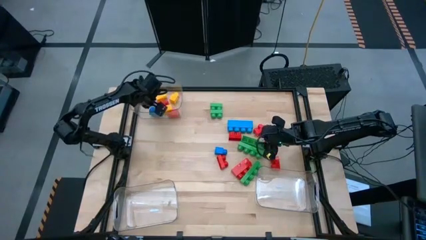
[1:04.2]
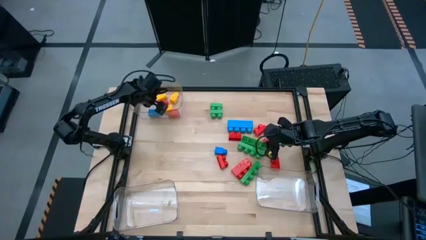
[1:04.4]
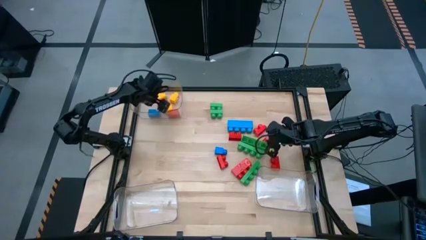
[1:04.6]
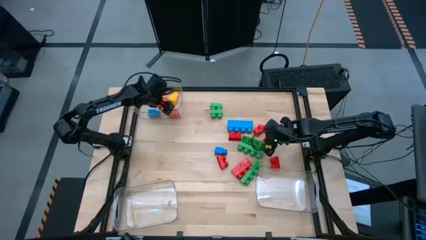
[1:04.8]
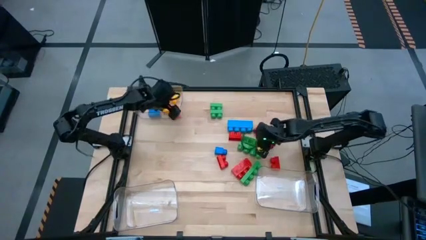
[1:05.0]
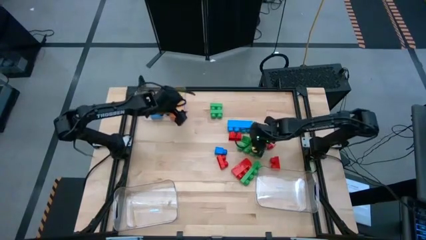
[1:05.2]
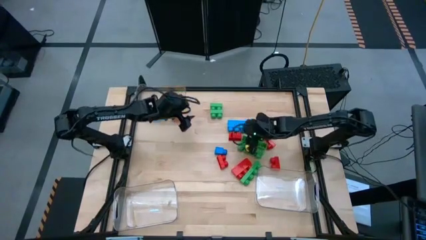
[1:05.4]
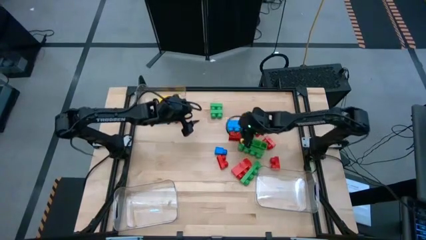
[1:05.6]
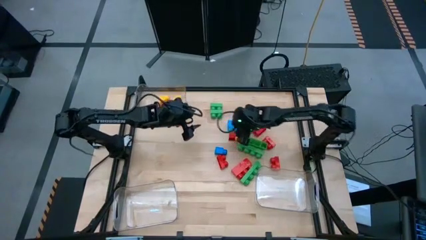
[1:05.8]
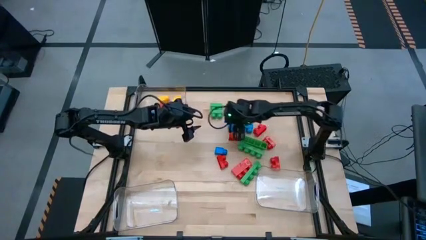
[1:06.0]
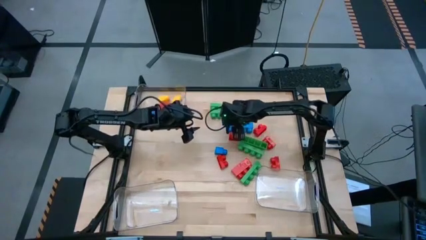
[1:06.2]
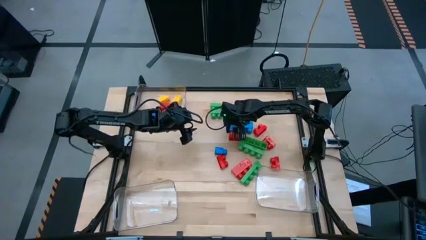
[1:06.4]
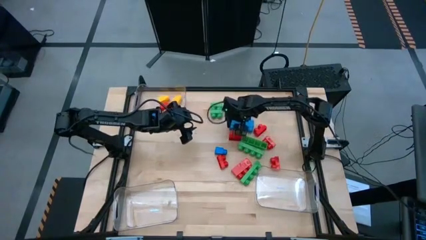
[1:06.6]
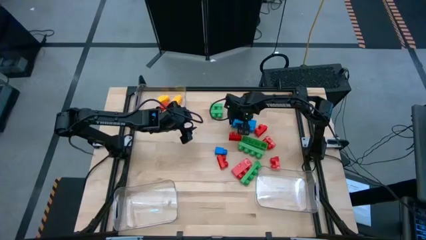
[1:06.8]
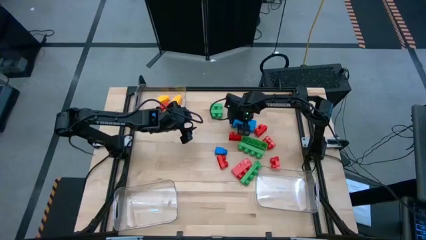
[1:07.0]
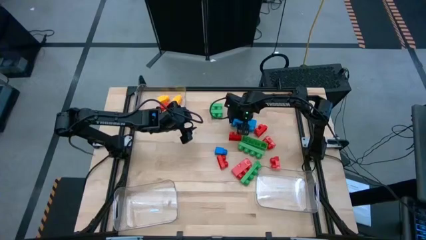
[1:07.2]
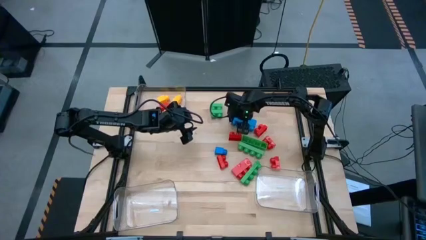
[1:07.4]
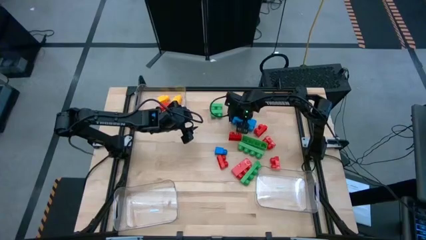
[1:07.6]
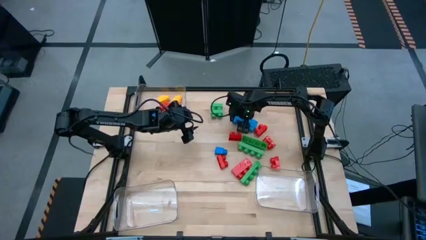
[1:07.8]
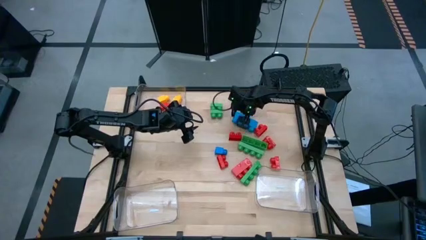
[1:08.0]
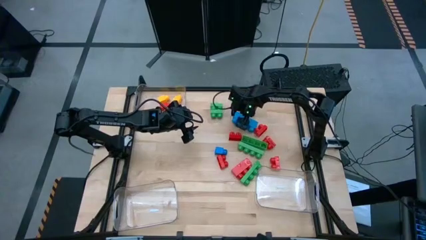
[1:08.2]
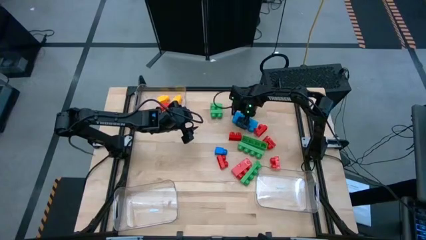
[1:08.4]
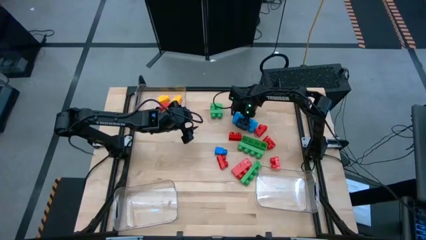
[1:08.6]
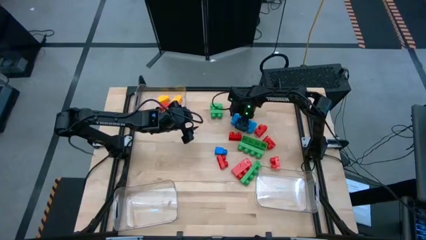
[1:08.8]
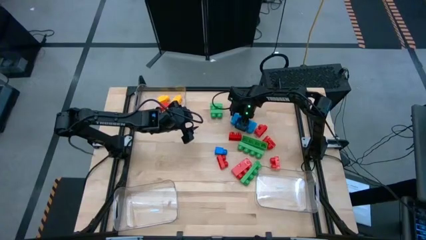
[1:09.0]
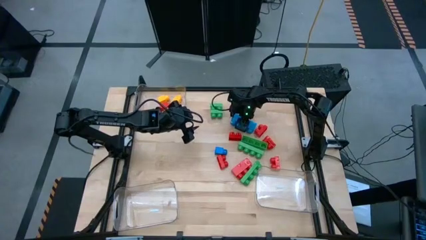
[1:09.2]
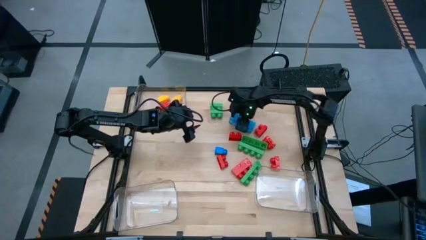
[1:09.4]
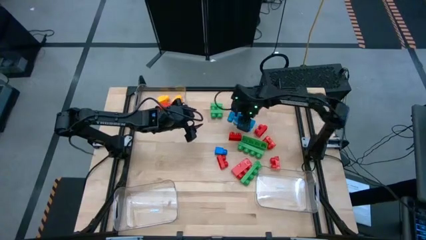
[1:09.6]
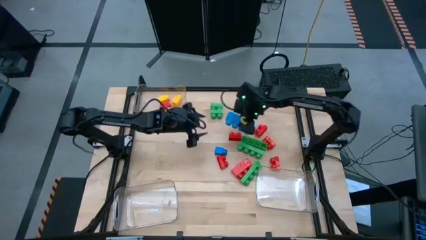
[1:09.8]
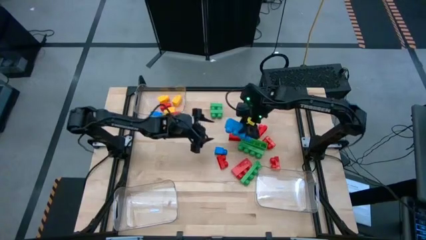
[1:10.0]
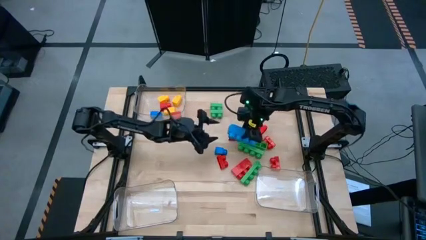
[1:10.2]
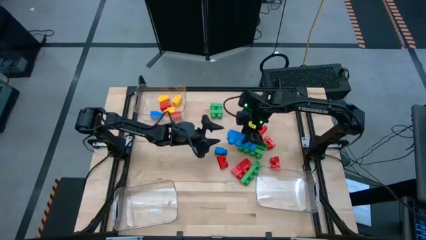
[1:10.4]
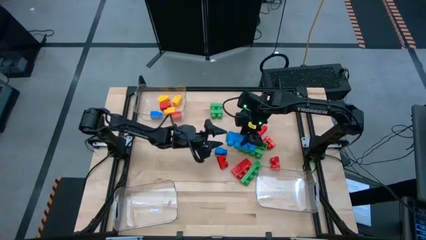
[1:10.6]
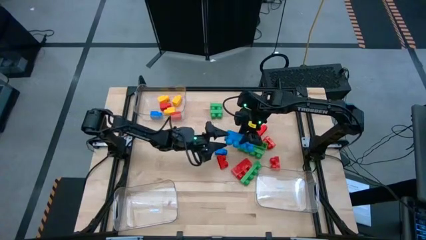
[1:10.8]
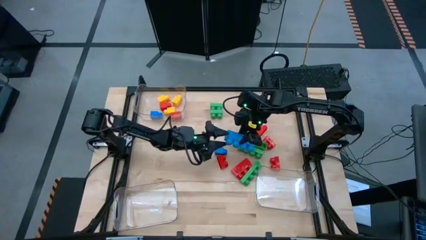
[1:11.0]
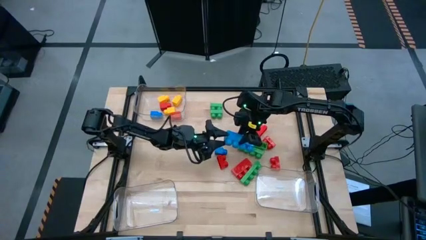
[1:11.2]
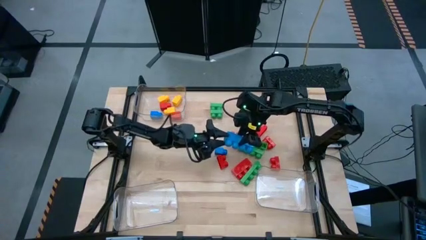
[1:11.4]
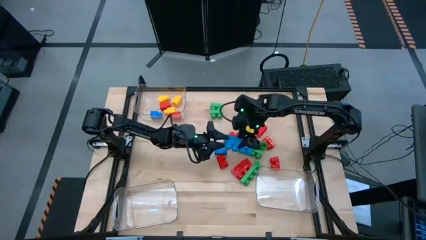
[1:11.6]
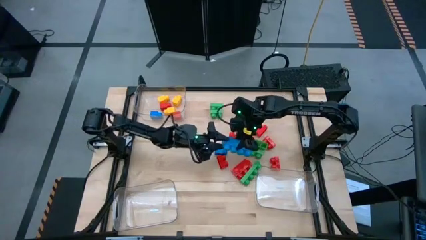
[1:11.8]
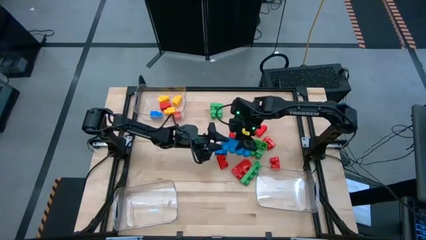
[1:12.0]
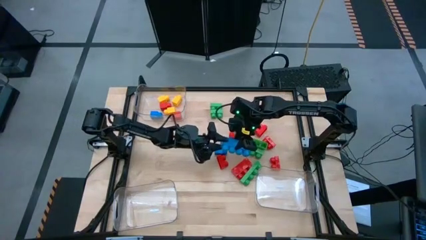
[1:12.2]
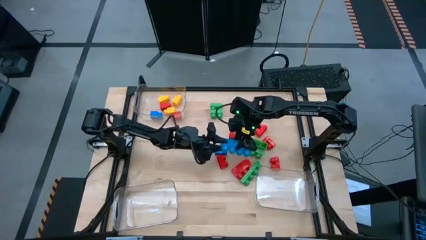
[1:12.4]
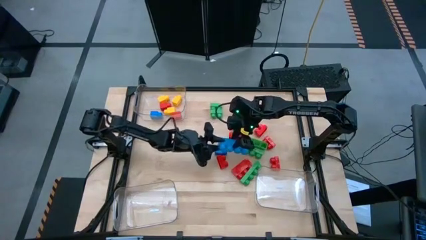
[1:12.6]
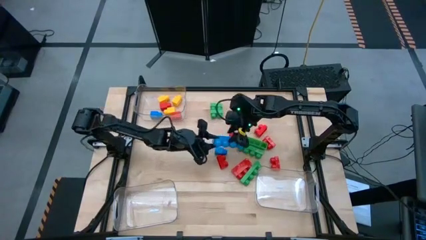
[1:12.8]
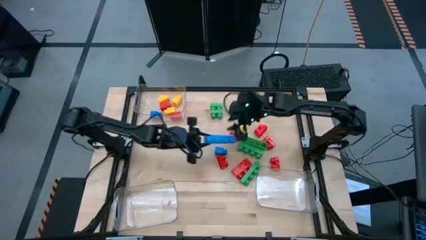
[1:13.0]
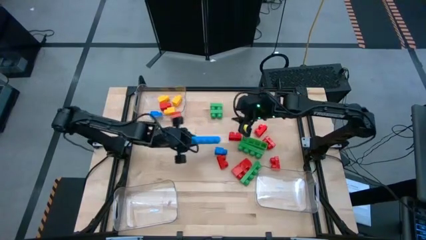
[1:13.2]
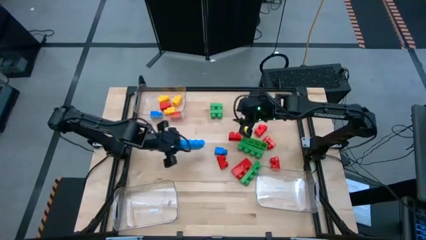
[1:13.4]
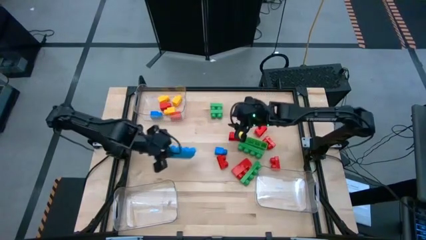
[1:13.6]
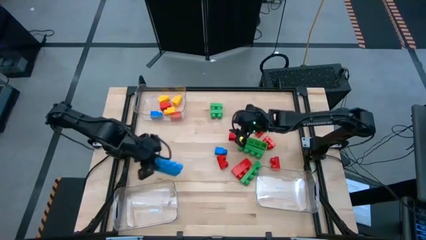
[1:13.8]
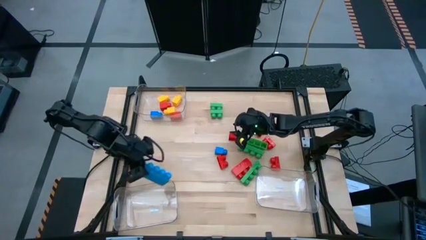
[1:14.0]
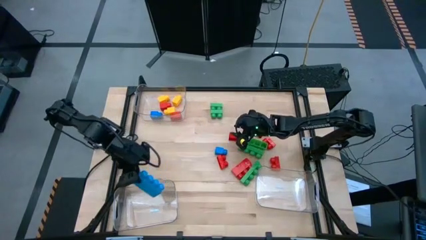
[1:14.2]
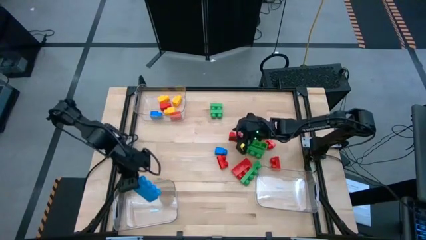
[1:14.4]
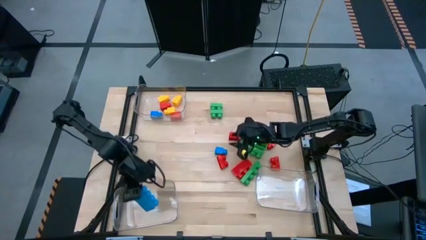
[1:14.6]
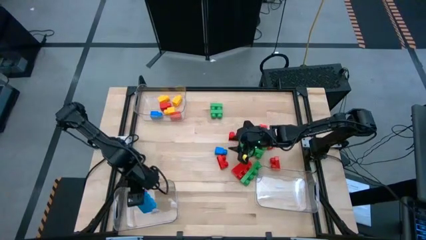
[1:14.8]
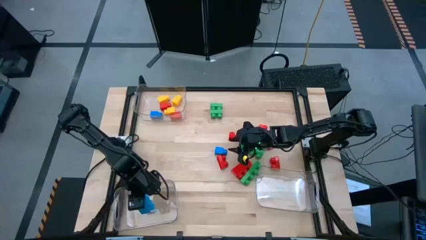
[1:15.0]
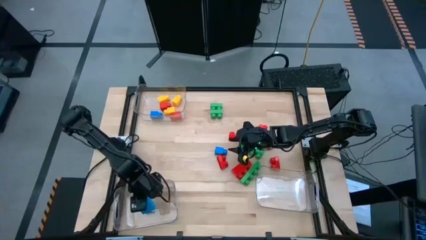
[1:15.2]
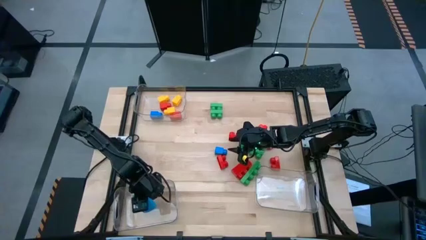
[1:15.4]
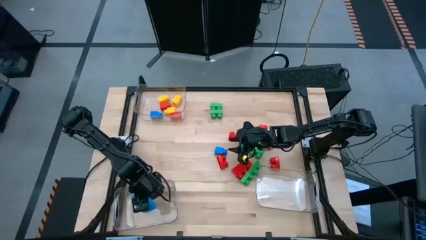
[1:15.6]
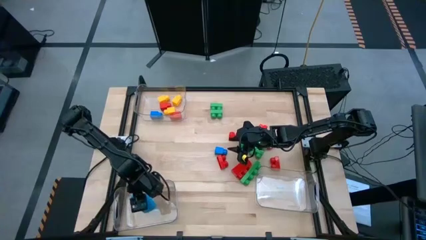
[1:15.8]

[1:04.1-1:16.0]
Task: Sort blocks by size
Put the four-stud blue game piece into the bottom left transparent bin

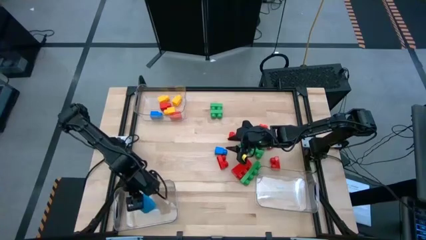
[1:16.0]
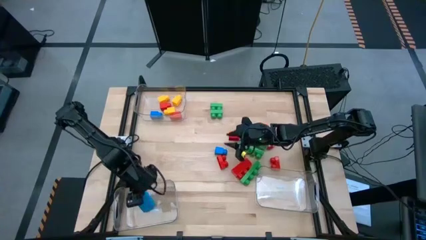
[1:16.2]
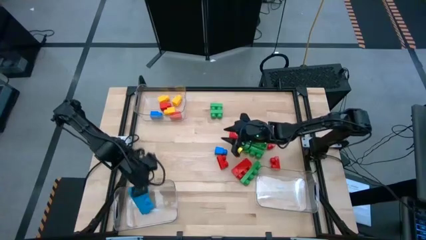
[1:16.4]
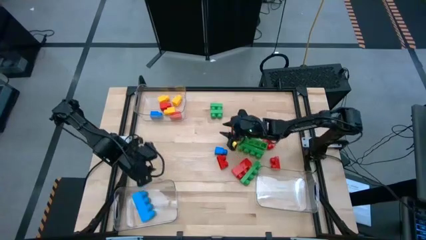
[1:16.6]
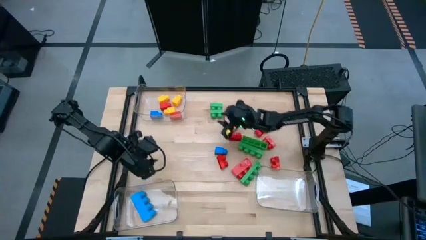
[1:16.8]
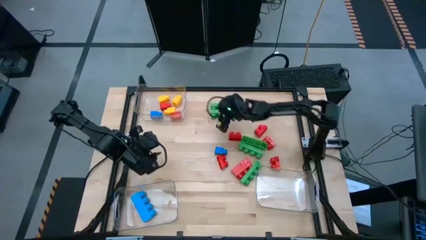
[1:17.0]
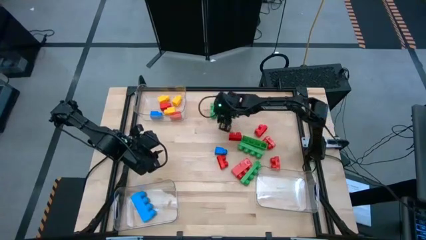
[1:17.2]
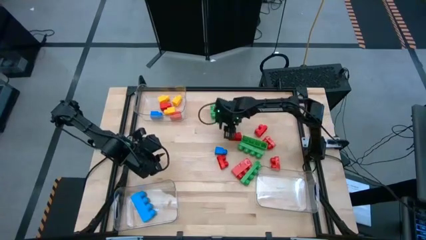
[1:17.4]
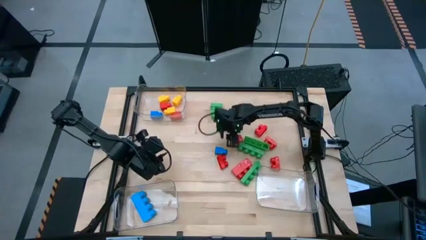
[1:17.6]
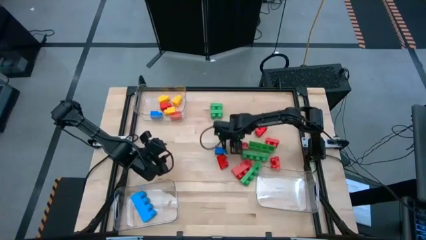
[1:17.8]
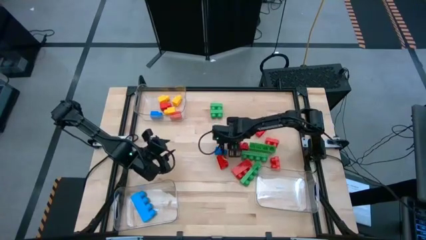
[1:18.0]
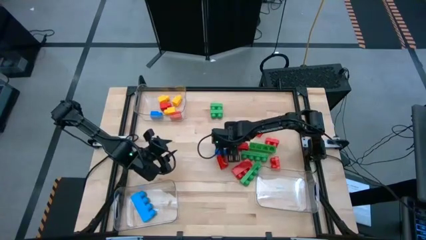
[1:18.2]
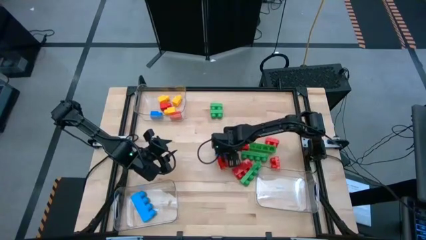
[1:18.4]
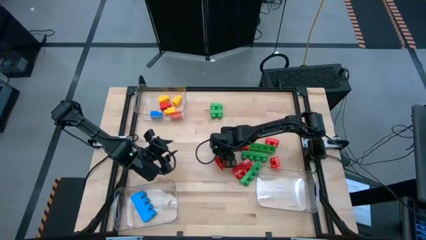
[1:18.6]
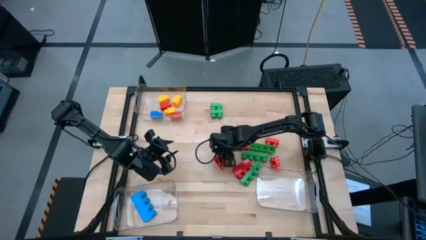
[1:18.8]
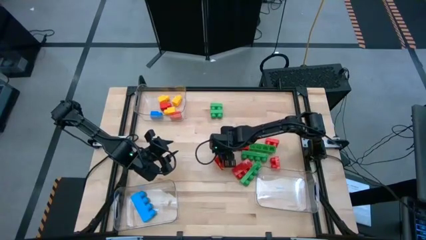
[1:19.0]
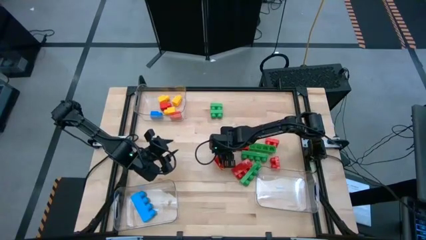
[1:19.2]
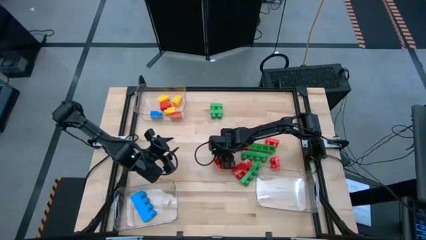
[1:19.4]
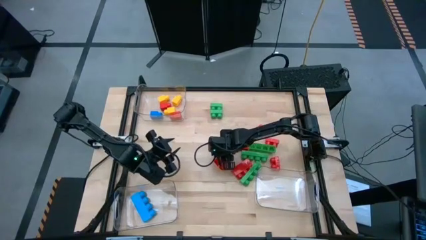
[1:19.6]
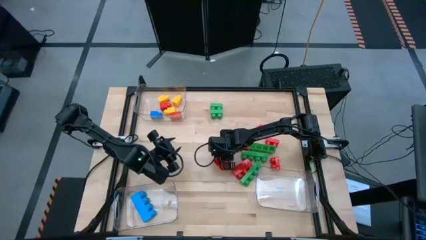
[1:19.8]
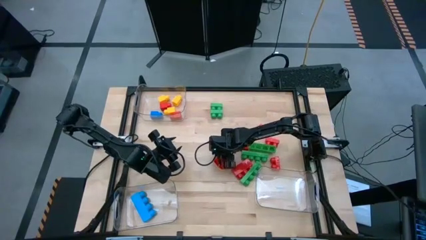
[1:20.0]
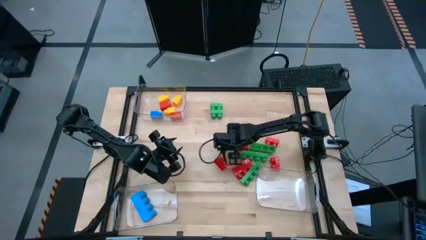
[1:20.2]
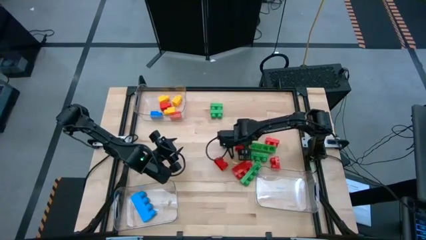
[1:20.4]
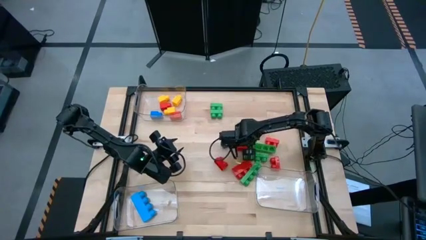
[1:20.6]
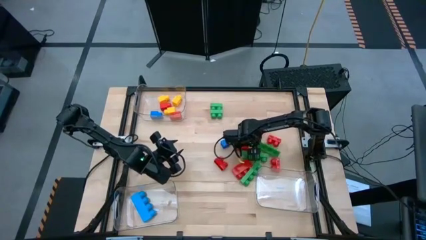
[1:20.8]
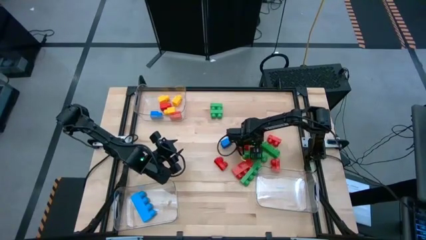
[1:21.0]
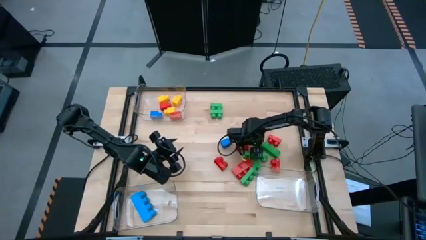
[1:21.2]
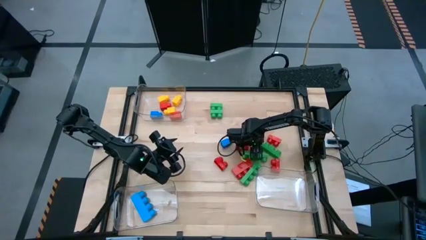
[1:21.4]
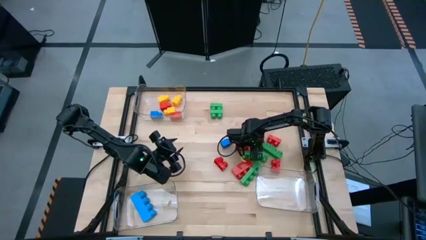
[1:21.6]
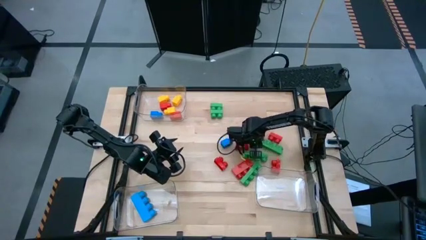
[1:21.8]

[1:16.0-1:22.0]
Put the four-stud green game piece into the bottom left transparent bin
